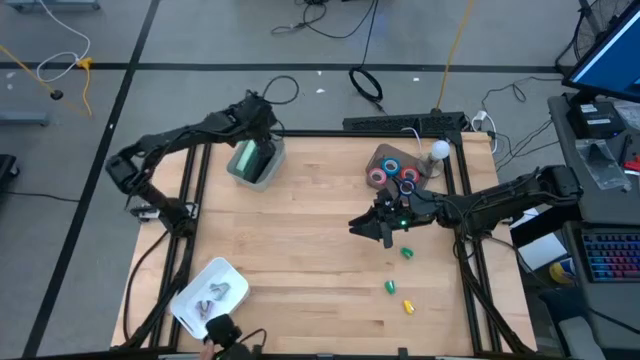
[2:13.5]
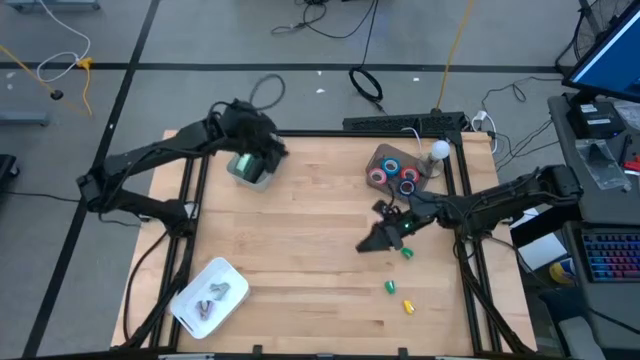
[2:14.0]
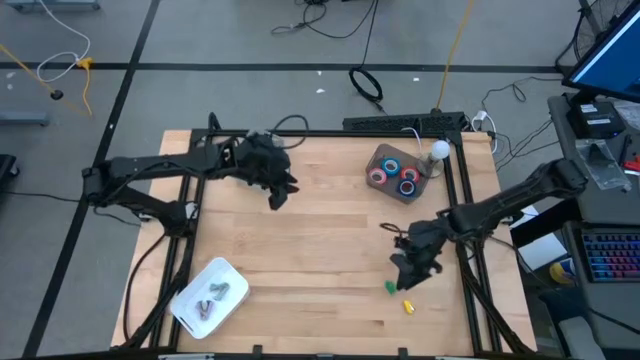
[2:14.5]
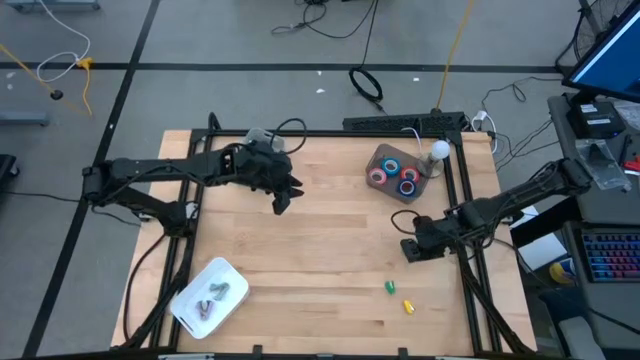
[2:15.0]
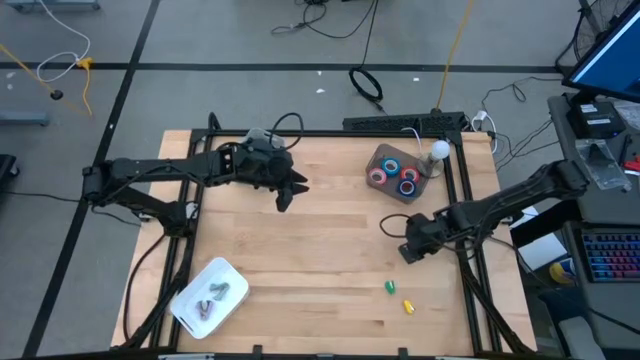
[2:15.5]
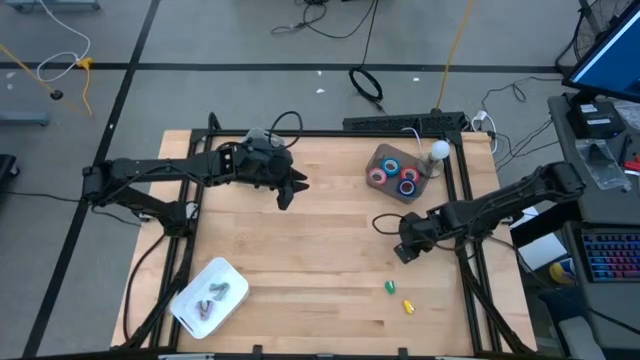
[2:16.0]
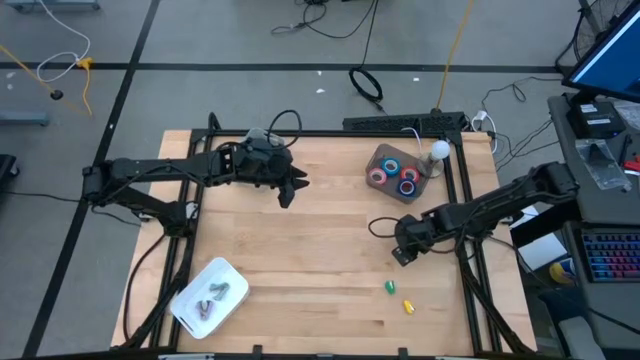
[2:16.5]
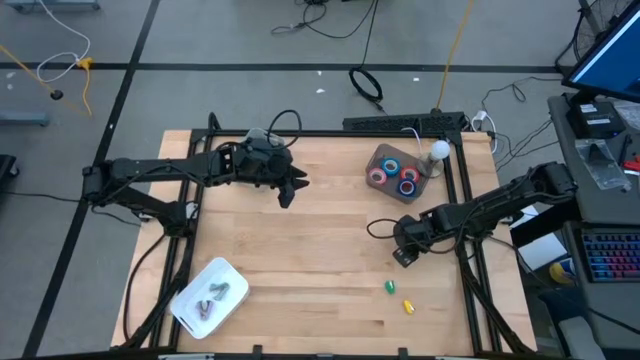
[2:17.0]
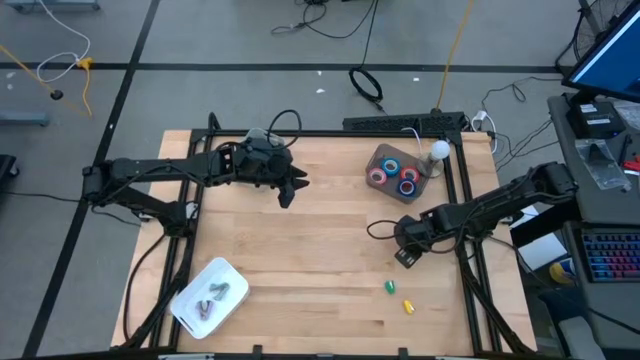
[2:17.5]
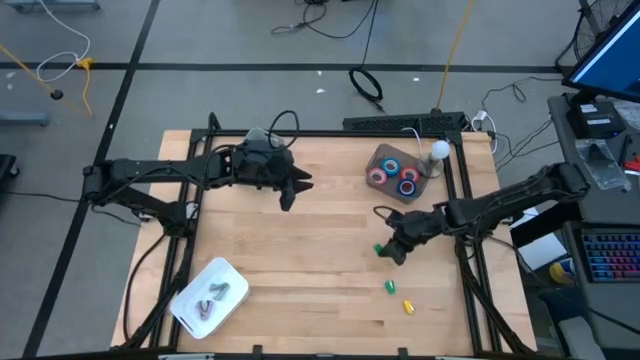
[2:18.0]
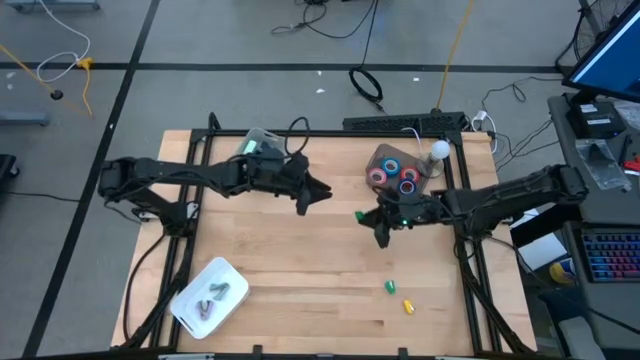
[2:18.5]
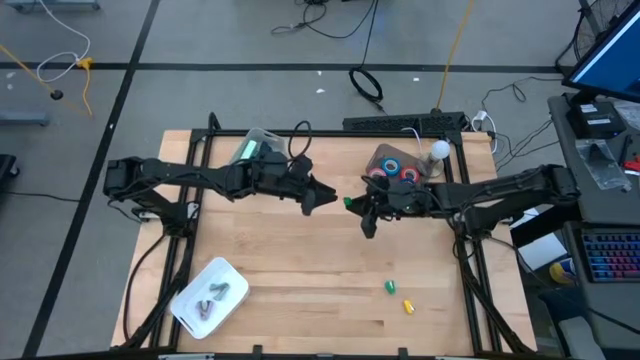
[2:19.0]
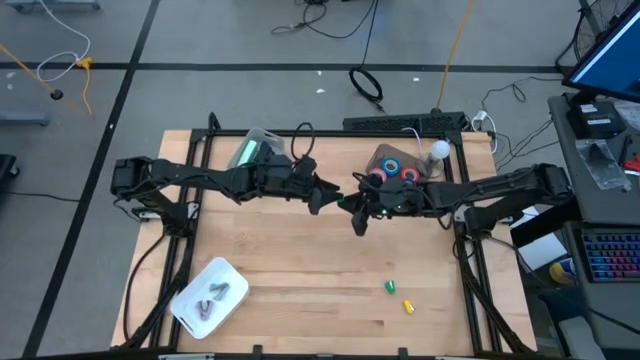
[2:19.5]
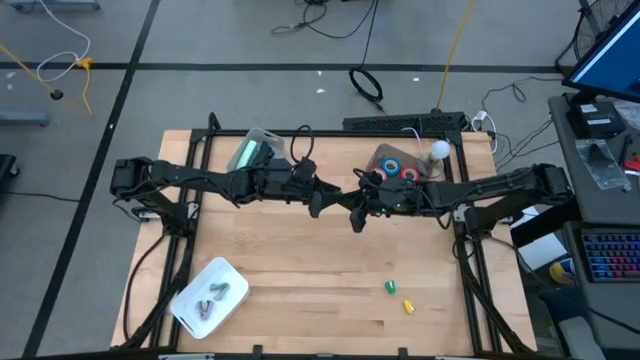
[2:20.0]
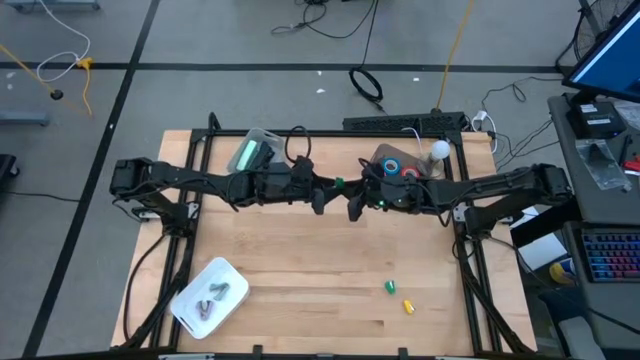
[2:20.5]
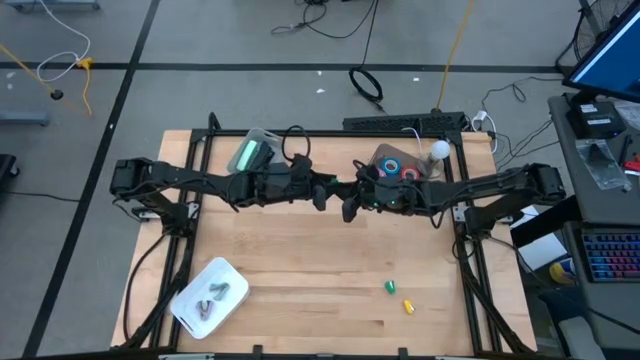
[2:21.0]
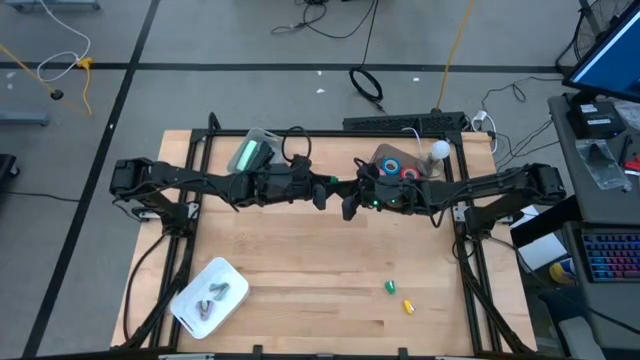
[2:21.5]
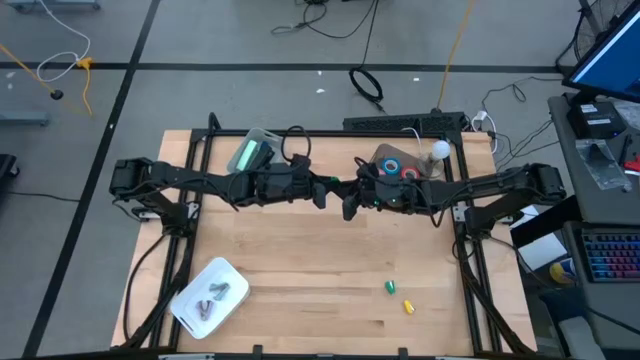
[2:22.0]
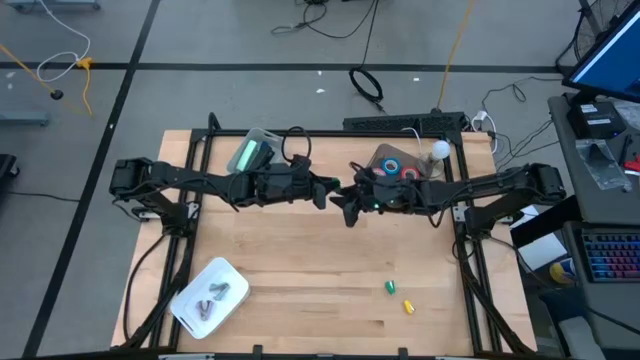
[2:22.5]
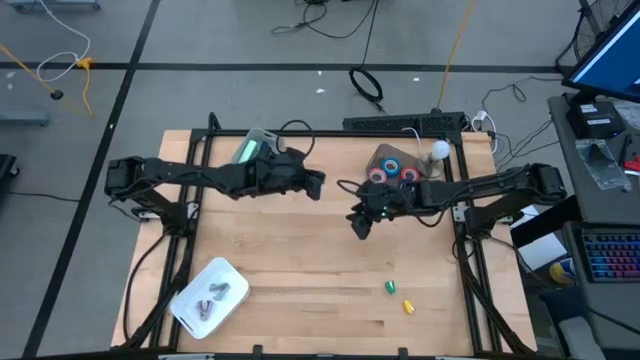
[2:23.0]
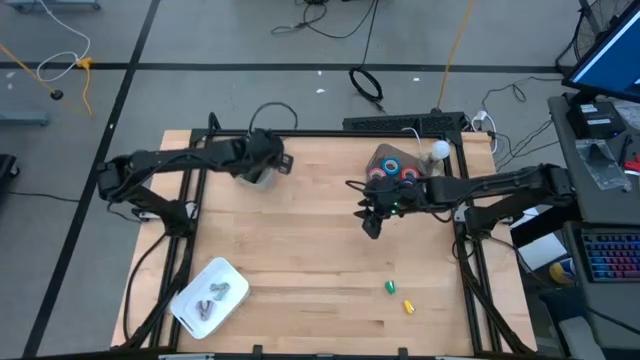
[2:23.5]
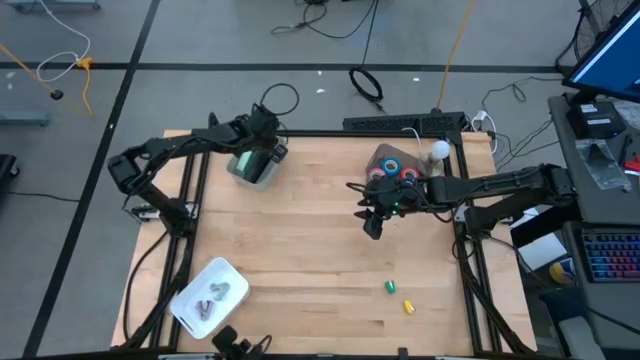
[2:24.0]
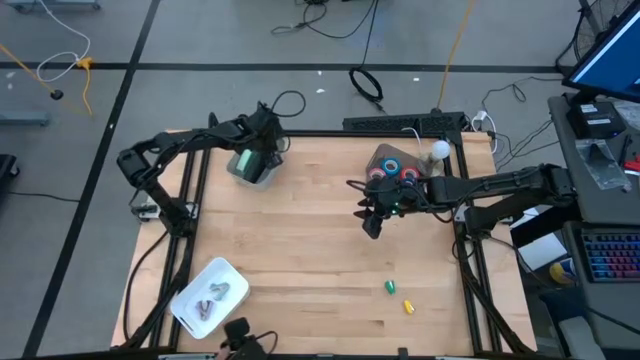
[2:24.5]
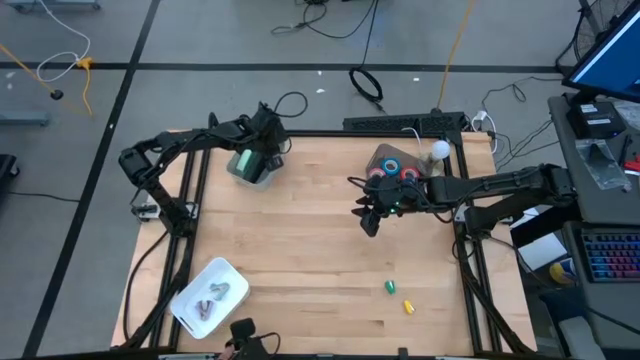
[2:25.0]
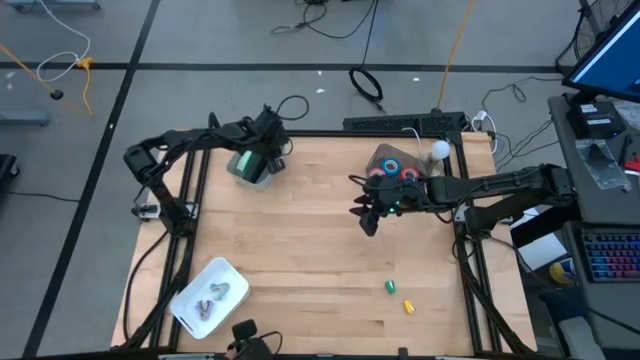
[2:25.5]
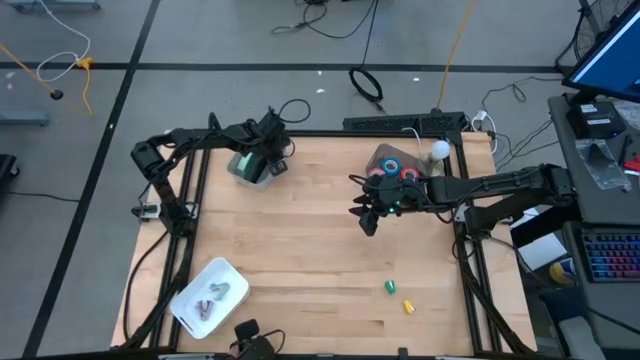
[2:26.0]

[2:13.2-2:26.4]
Task: Pick and place Stapler, Stapler remover, tape
Put the small green stapler into the gray bin

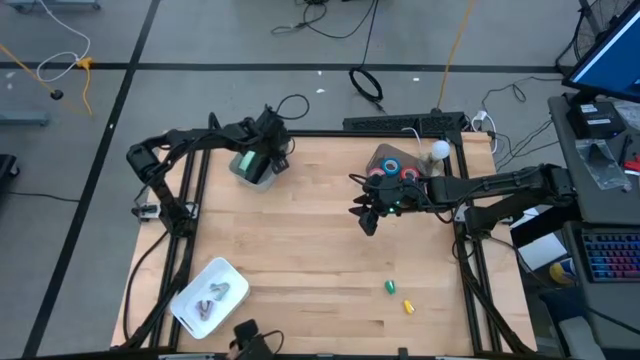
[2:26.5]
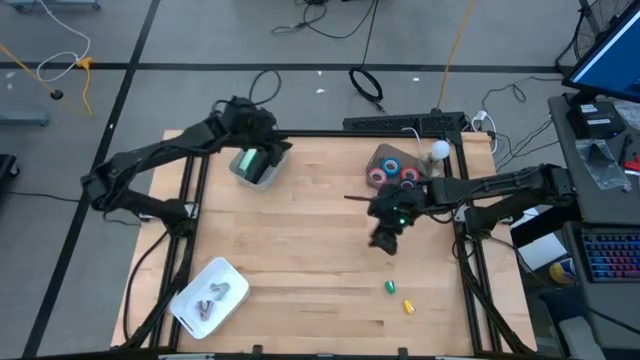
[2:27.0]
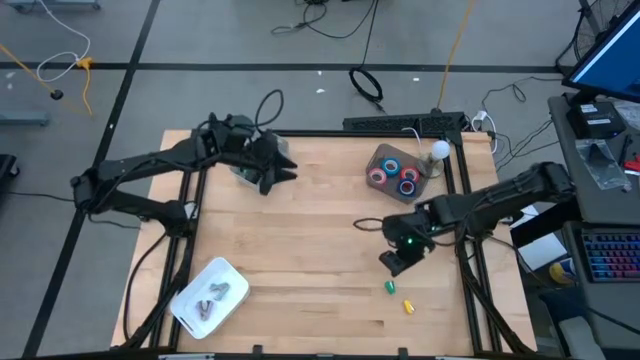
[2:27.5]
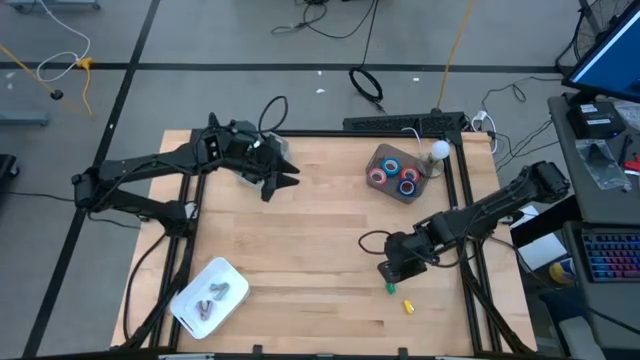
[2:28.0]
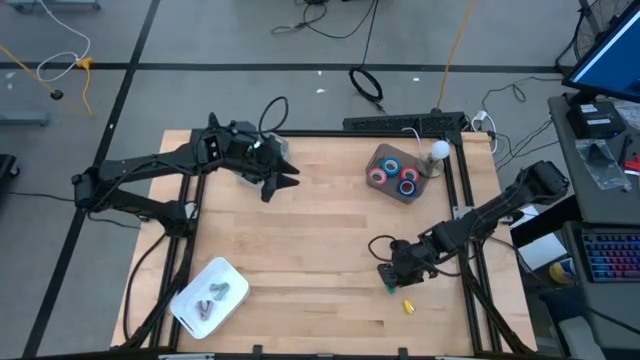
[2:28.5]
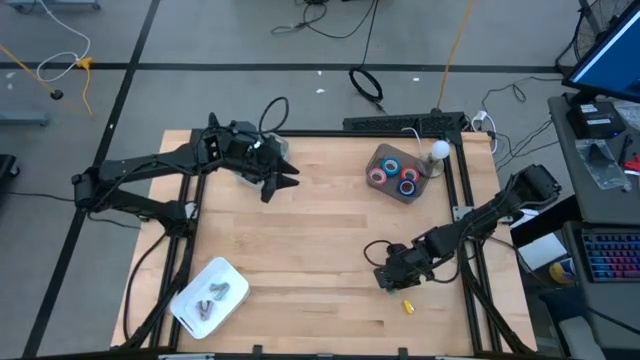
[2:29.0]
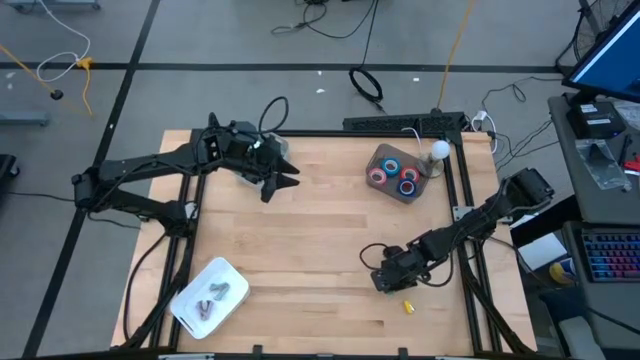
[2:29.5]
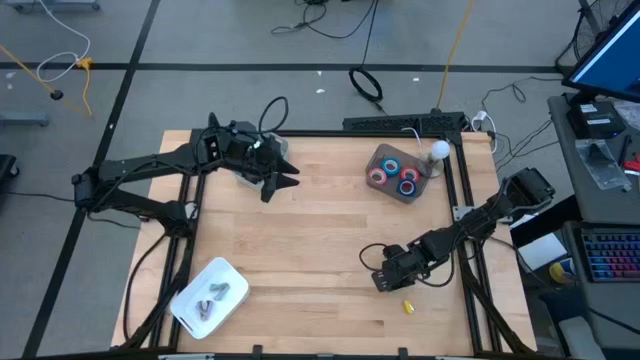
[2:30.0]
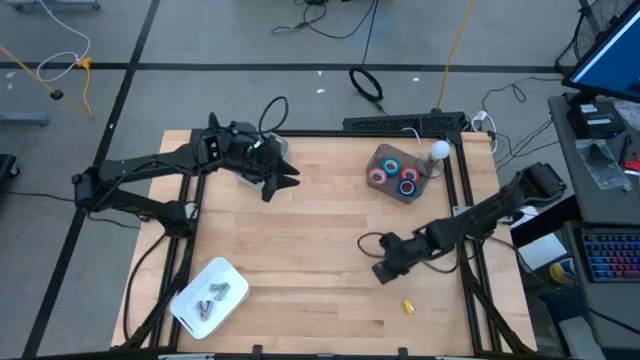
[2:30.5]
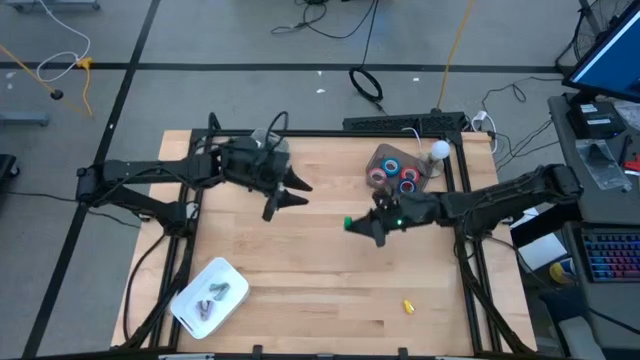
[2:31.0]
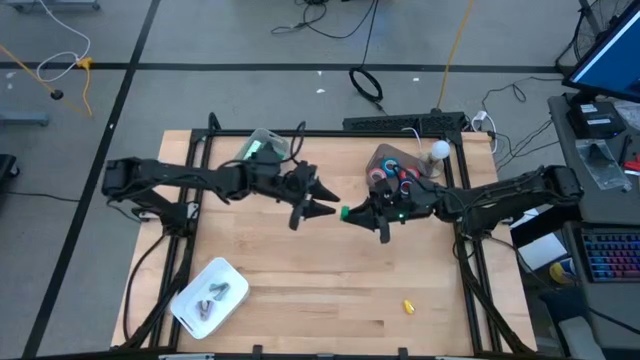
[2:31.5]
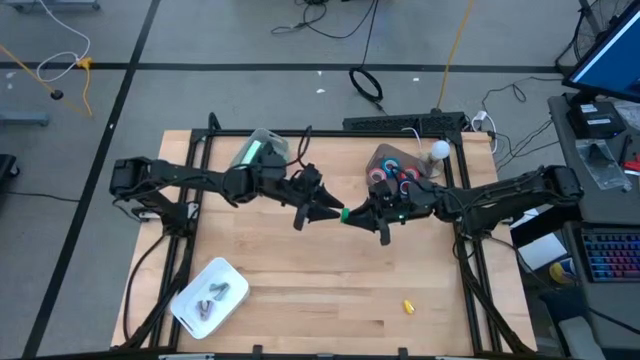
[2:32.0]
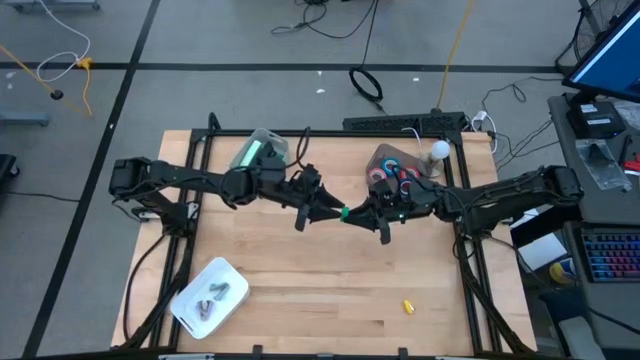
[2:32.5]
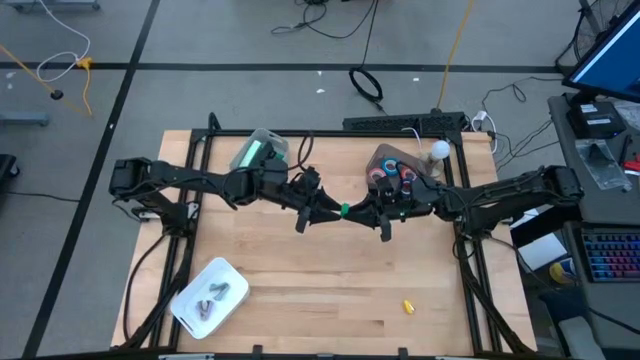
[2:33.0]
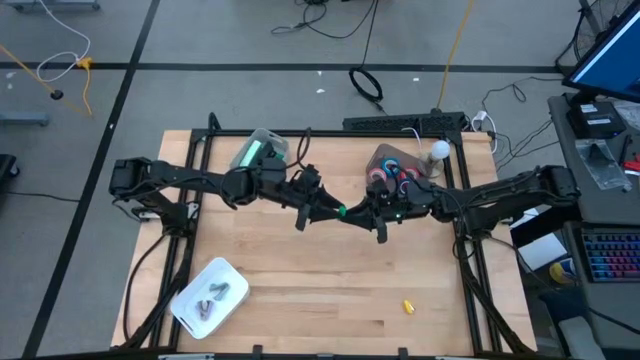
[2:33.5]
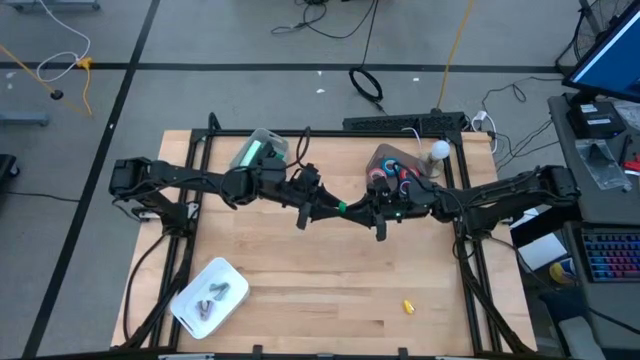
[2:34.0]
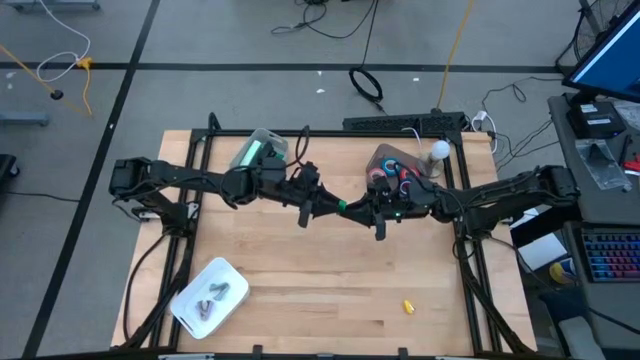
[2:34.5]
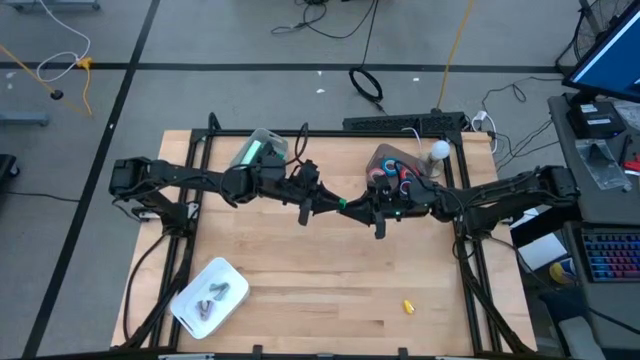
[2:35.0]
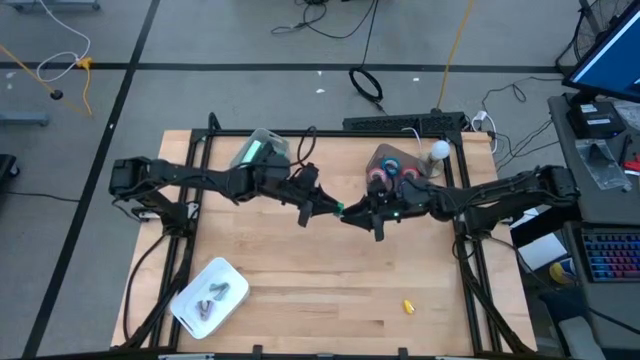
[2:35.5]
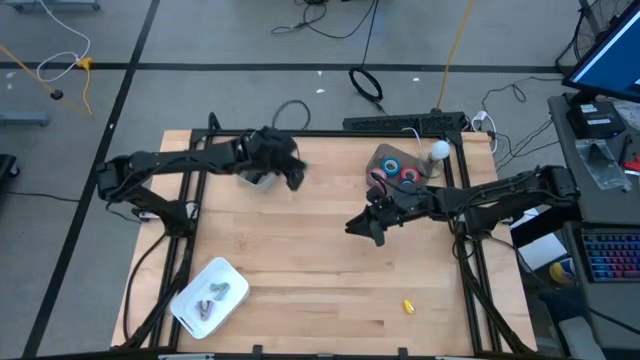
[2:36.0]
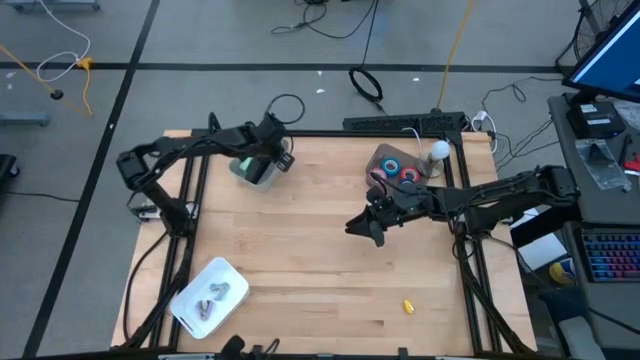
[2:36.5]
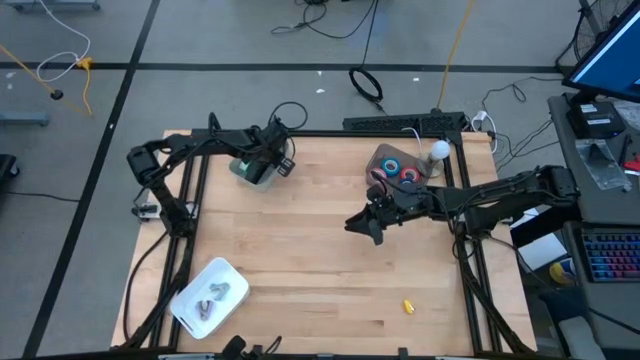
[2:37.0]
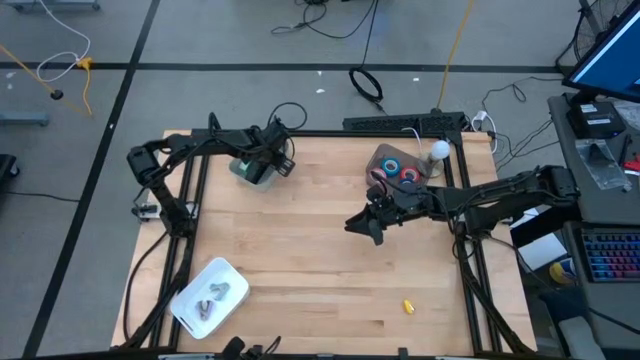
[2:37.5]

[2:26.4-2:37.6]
Put the small green stapler into the gray bin
